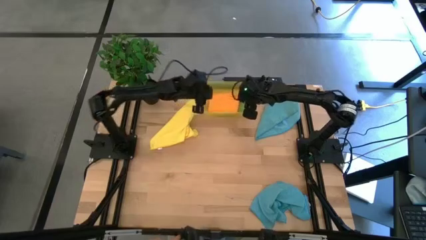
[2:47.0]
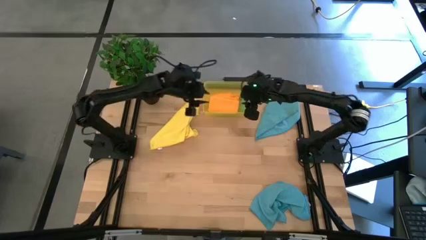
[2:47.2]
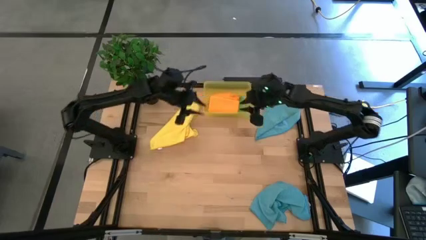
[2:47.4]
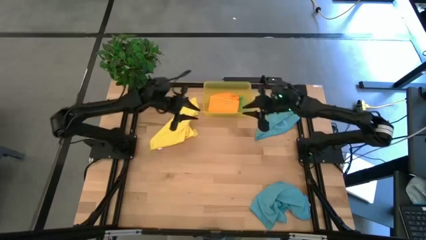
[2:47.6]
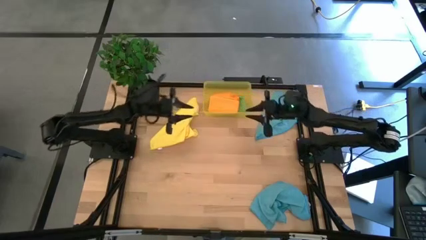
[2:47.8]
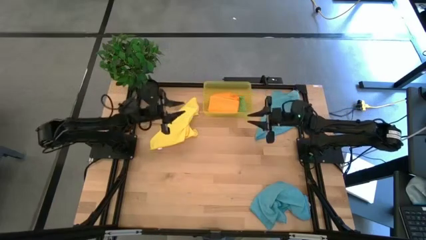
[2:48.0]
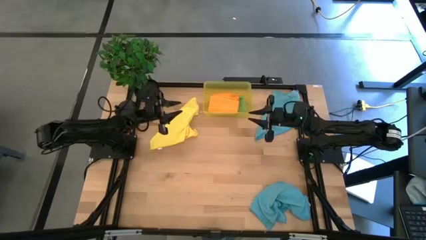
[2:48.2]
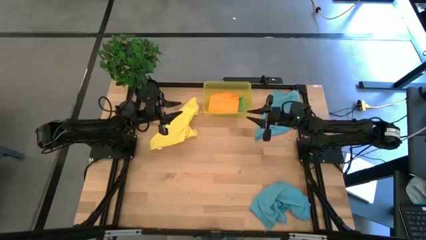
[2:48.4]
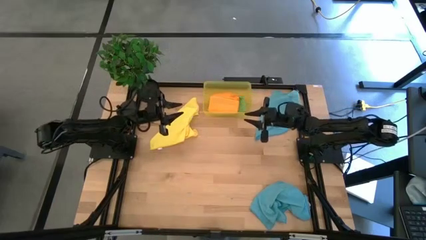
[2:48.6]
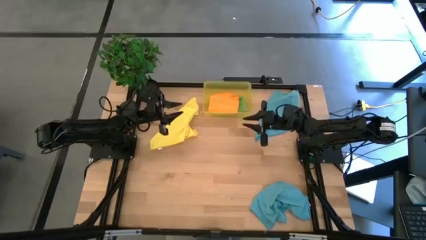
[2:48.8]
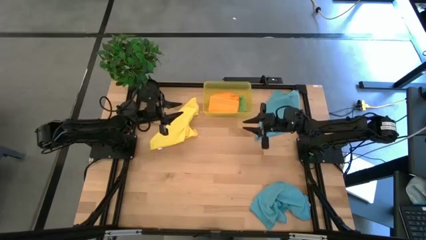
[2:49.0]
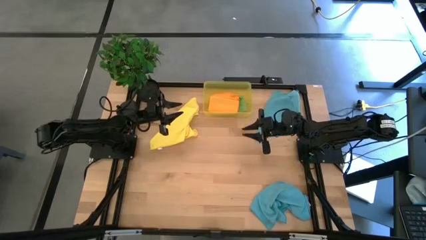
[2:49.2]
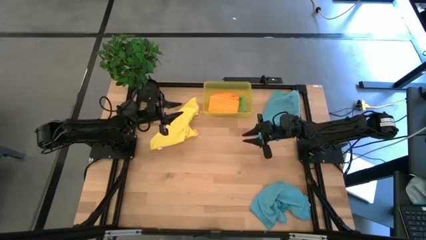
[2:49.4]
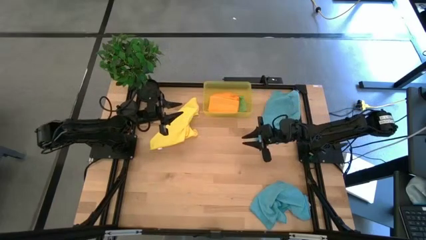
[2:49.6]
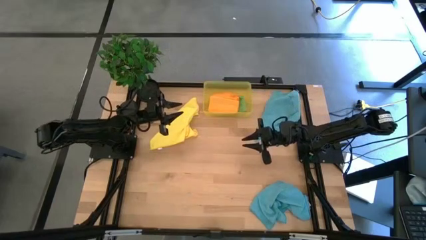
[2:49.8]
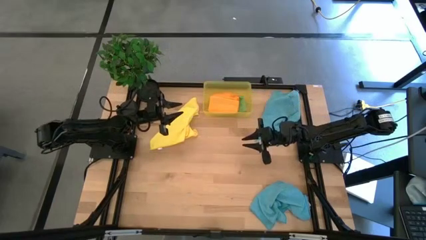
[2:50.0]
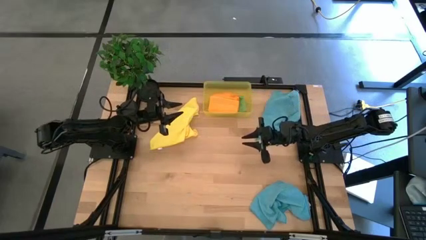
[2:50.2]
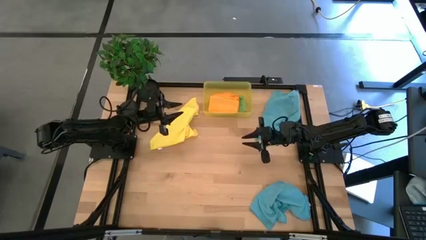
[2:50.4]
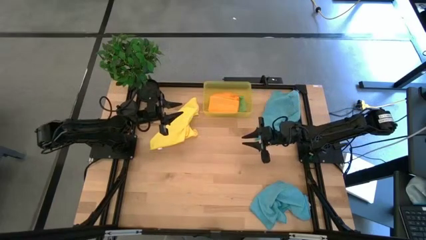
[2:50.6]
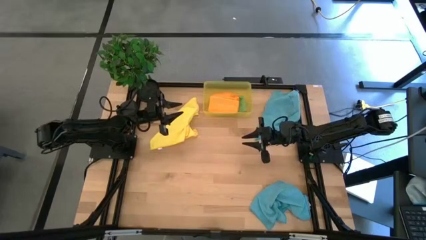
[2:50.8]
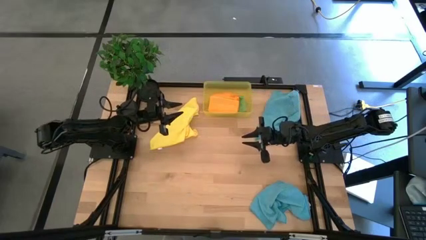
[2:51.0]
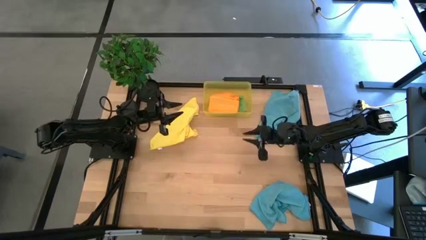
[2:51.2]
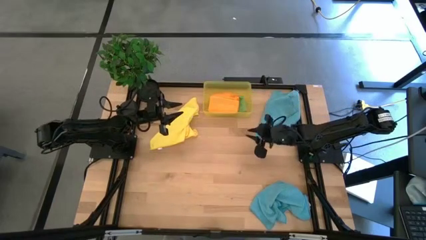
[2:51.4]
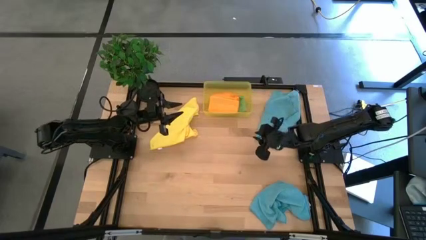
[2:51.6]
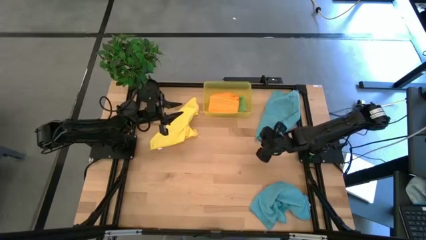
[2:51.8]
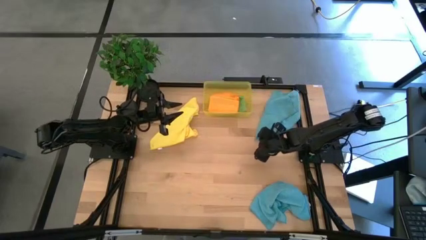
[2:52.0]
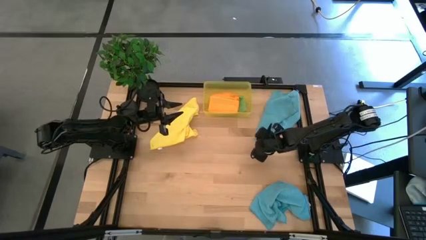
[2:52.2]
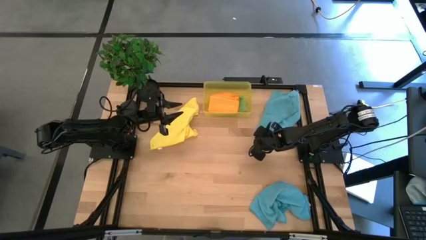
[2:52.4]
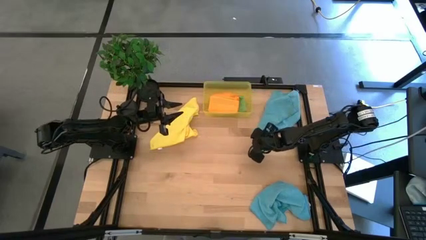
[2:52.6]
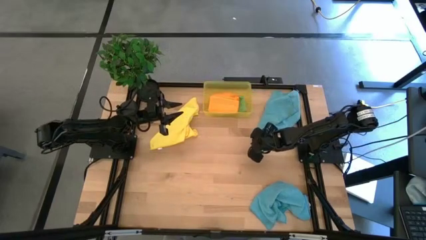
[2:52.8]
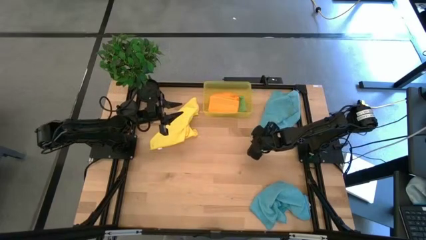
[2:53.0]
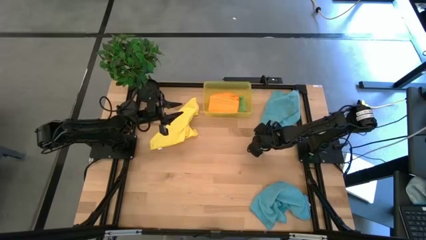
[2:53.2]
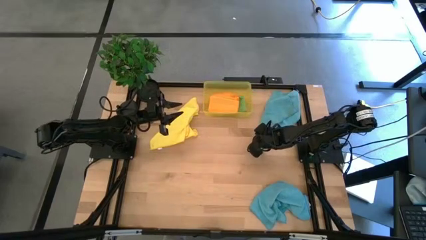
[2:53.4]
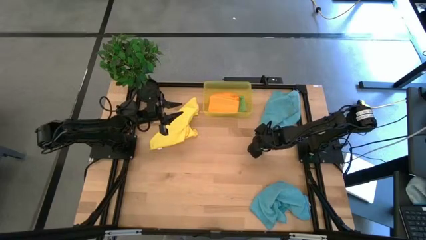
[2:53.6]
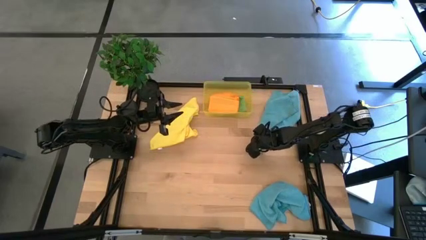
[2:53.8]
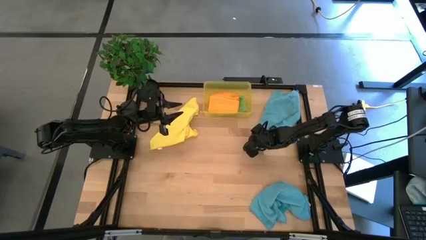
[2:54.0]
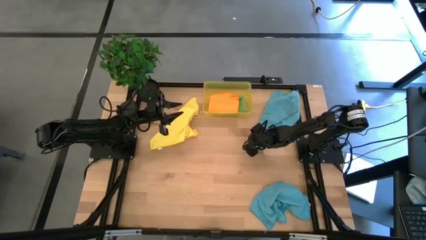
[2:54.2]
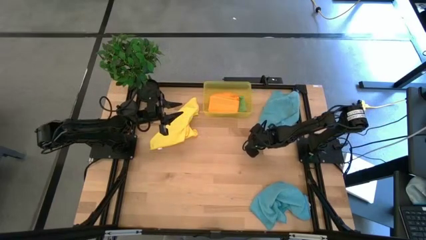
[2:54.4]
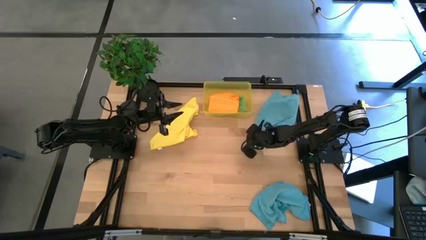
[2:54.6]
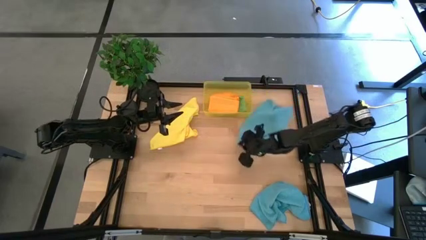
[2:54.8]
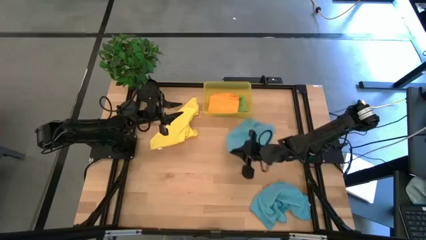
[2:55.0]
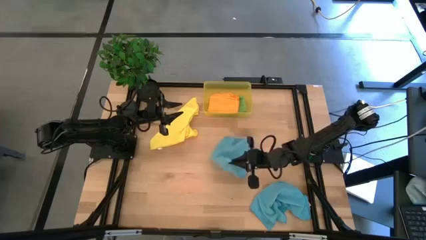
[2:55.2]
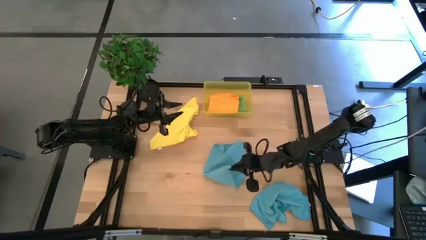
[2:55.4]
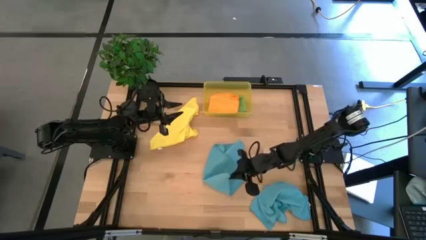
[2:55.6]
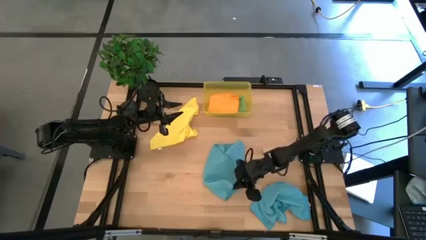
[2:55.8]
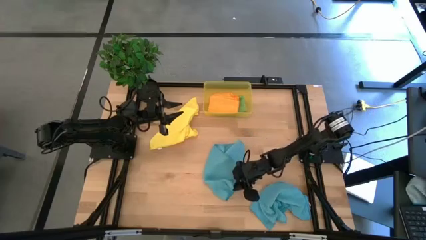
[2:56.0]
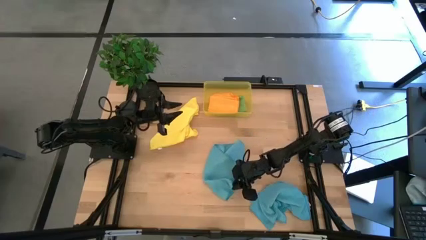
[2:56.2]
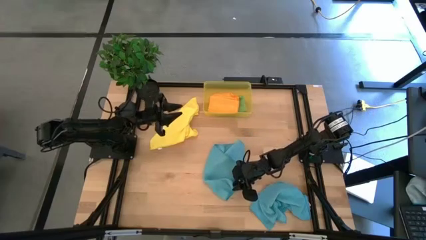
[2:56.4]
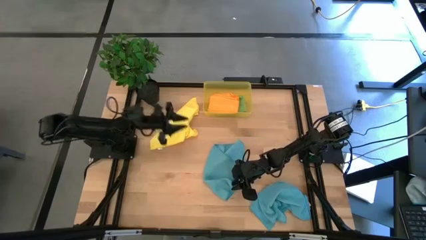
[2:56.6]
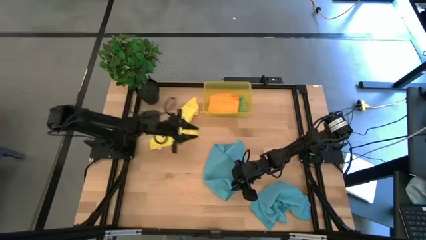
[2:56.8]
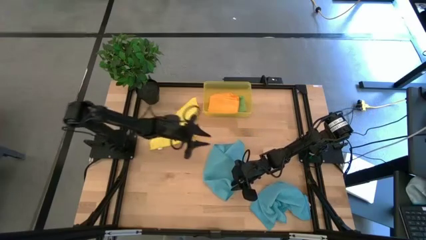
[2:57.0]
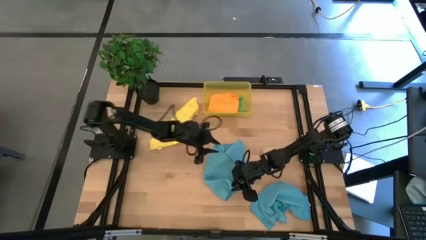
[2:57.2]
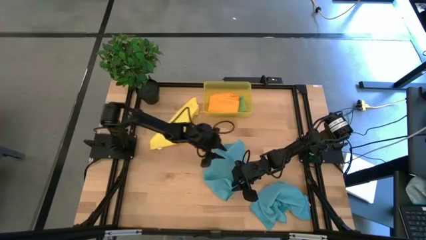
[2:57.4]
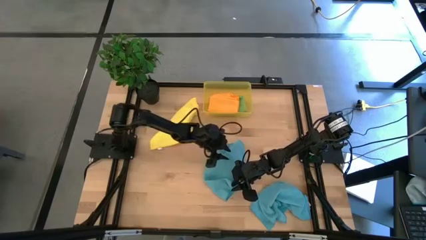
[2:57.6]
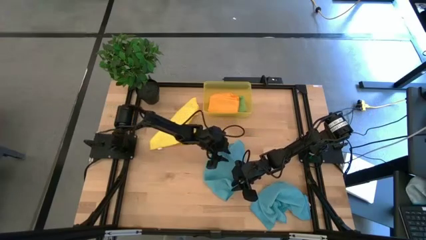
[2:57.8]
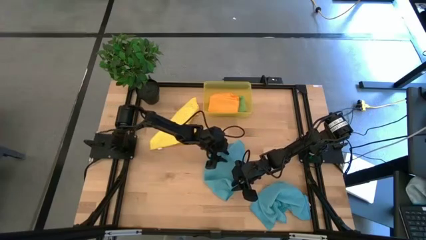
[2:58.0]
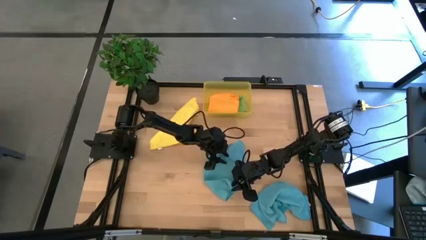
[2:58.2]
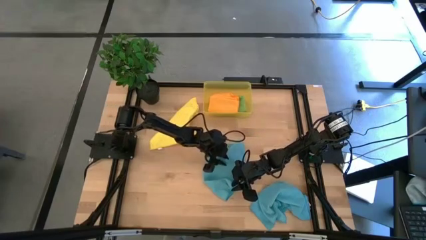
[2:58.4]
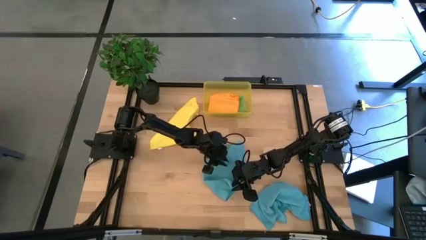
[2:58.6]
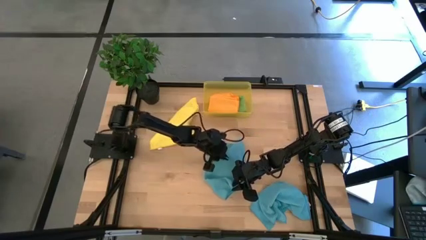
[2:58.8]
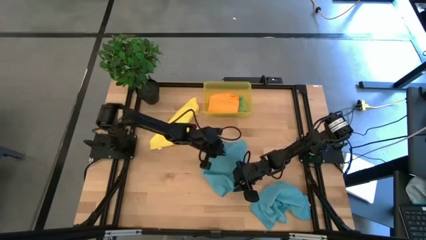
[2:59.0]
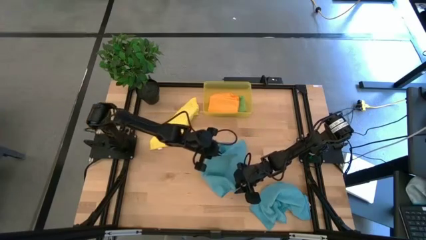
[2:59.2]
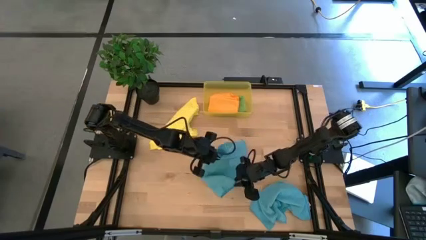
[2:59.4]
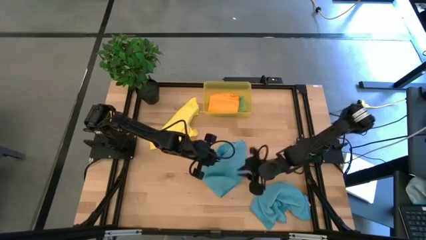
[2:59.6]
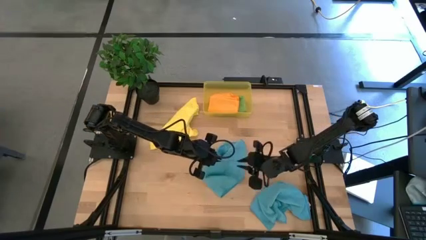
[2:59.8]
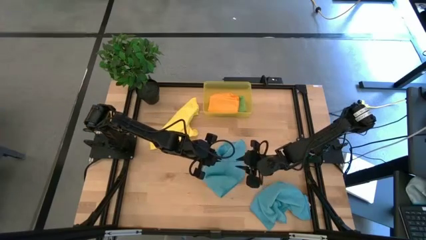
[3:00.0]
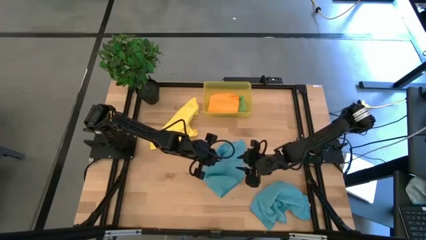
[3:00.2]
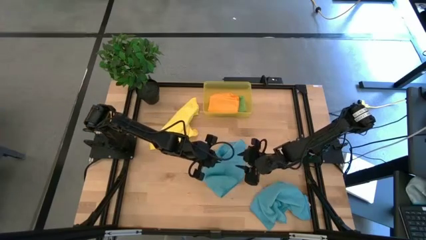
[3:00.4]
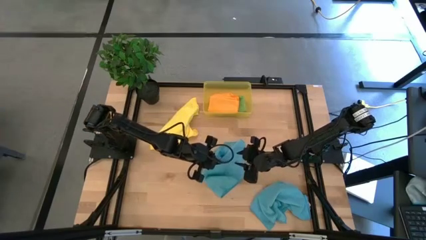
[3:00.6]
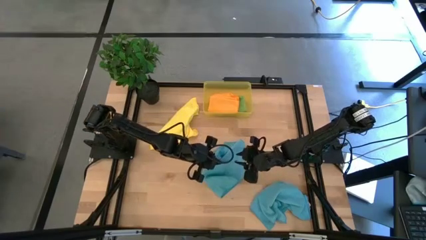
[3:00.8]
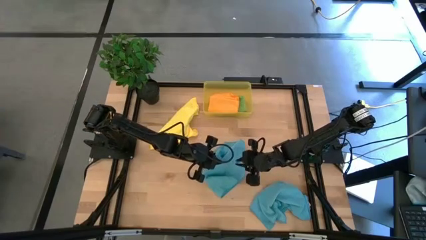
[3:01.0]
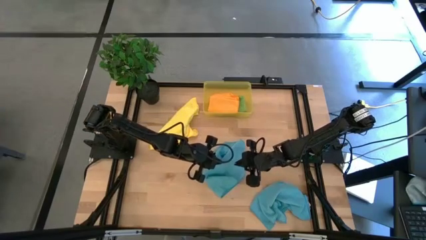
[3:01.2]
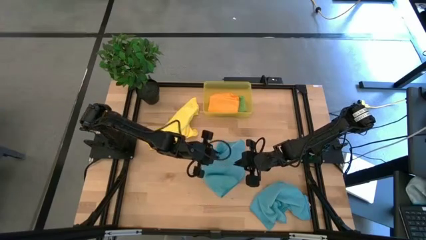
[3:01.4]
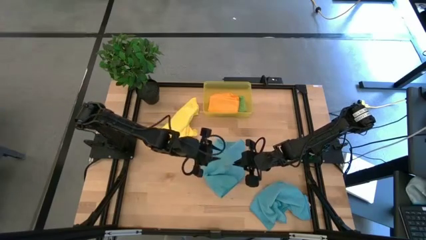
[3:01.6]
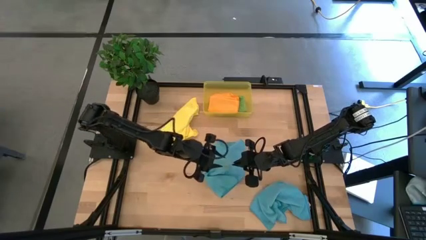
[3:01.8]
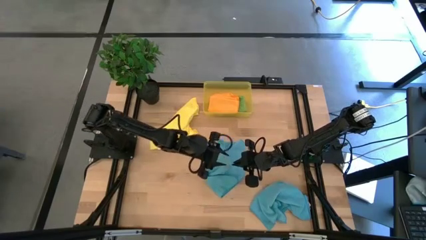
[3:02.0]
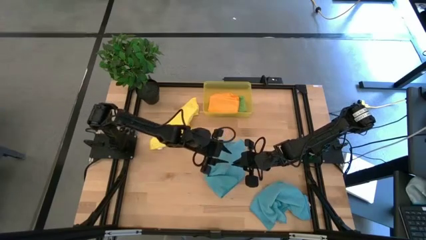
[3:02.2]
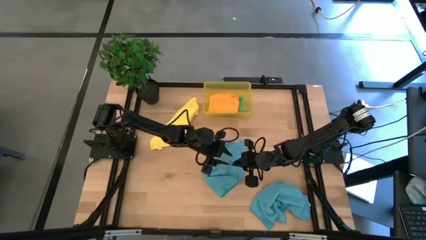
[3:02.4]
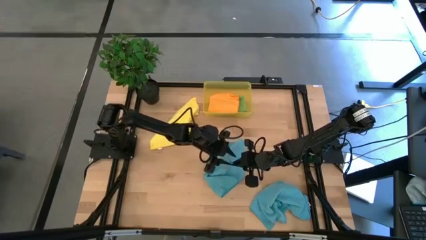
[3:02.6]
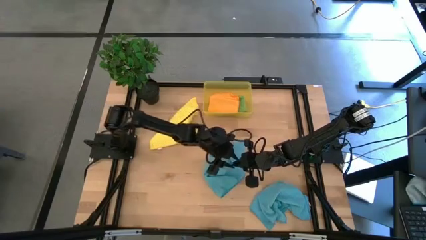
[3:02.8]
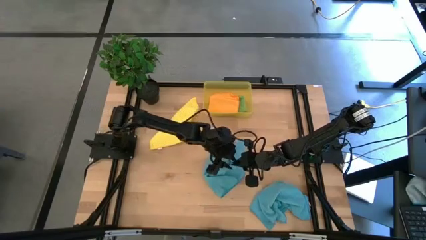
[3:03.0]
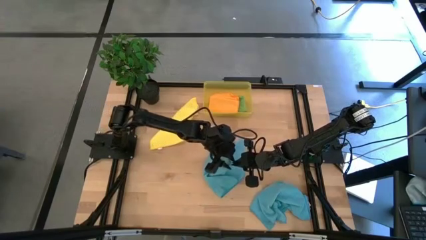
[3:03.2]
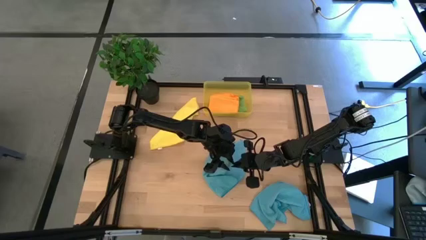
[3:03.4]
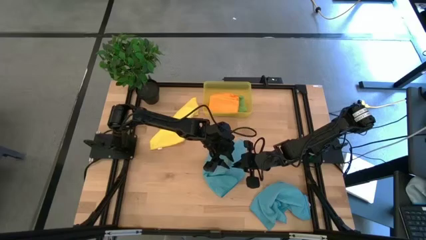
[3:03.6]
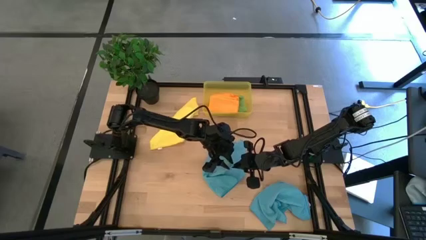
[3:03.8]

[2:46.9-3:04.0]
Task: Fold microfiber towels
Fold the top blue microfiber cloth
